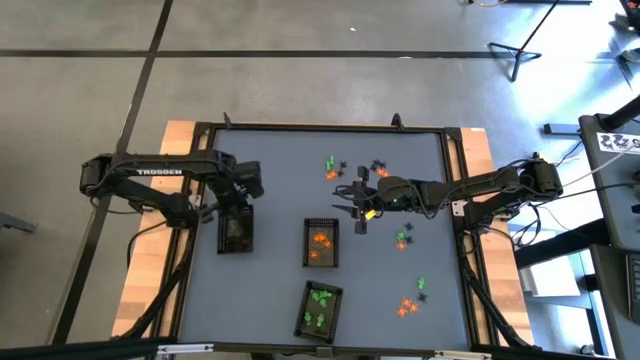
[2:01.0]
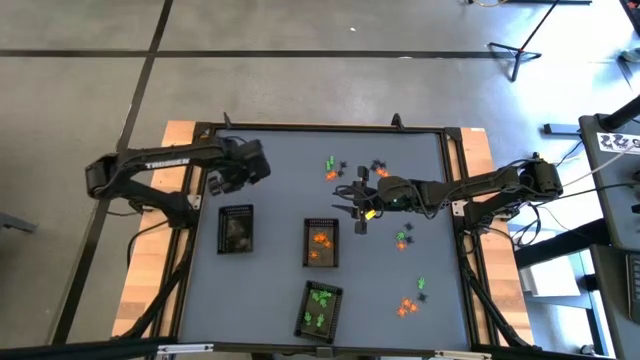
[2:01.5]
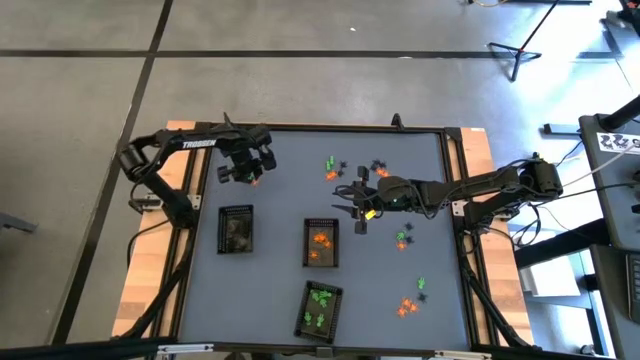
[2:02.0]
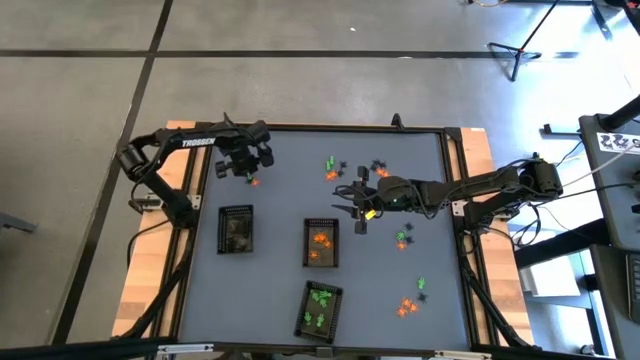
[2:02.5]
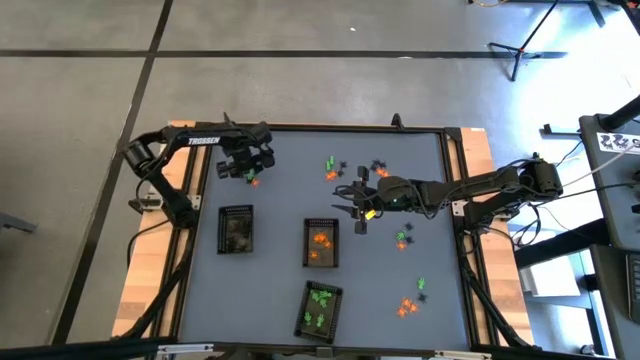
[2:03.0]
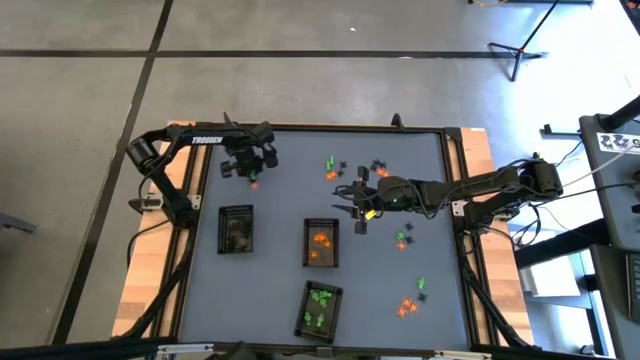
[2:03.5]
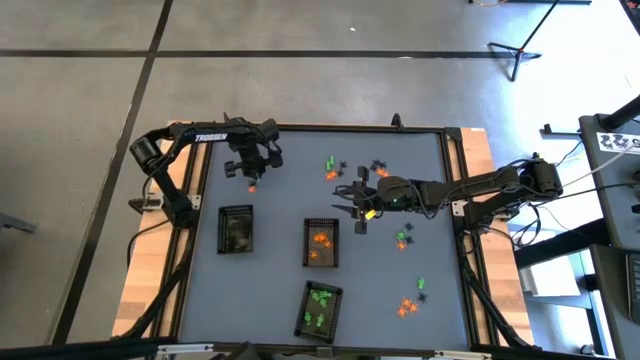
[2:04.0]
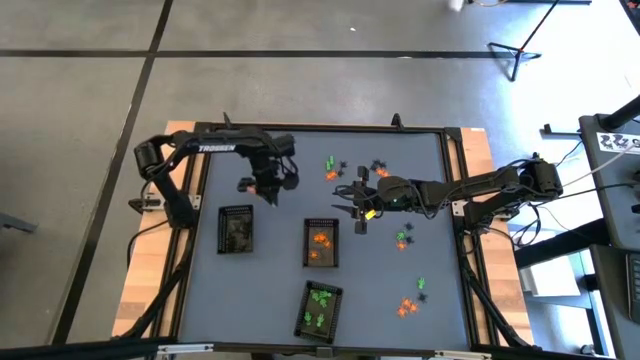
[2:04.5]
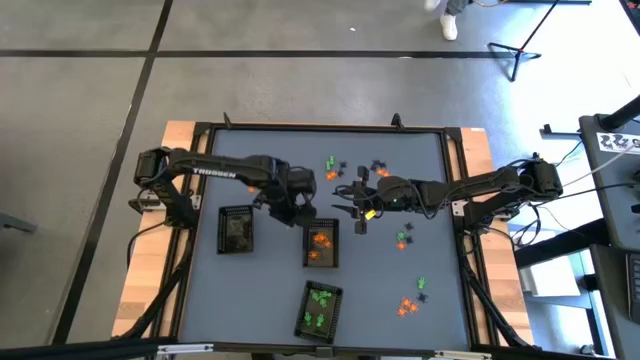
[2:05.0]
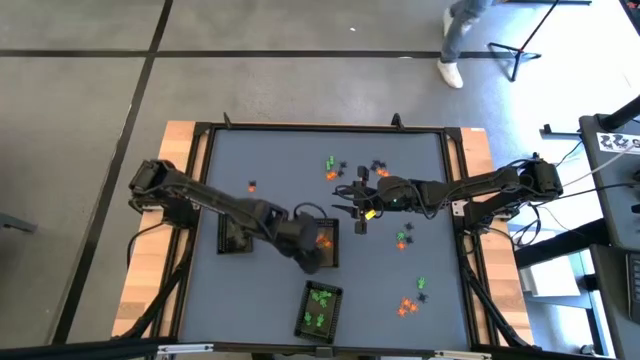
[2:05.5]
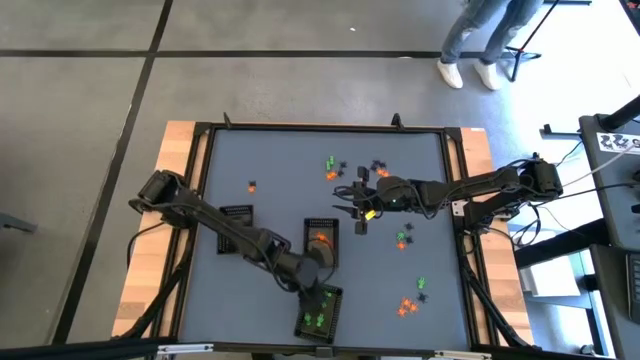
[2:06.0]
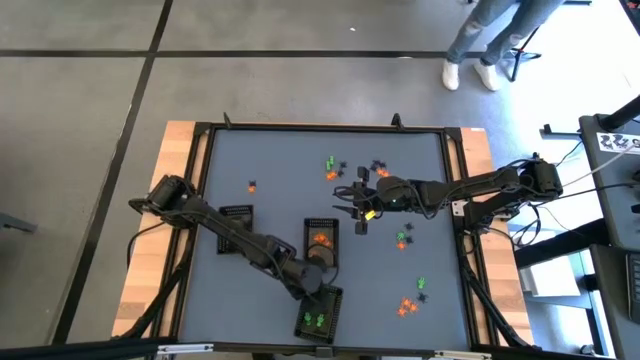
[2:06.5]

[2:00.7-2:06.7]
Task: Sort Halloween decoration
Put the green toy skeleton into the bottom black basket

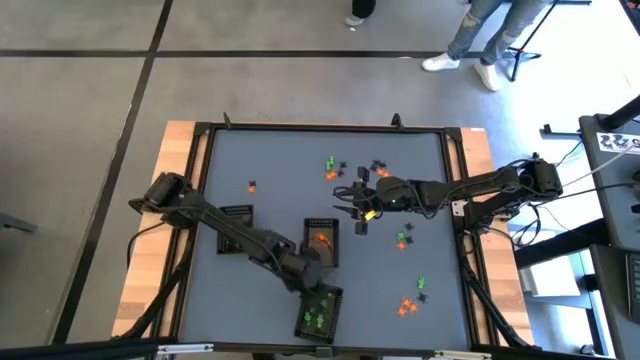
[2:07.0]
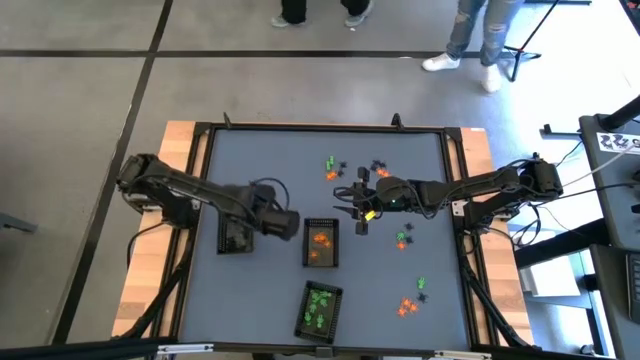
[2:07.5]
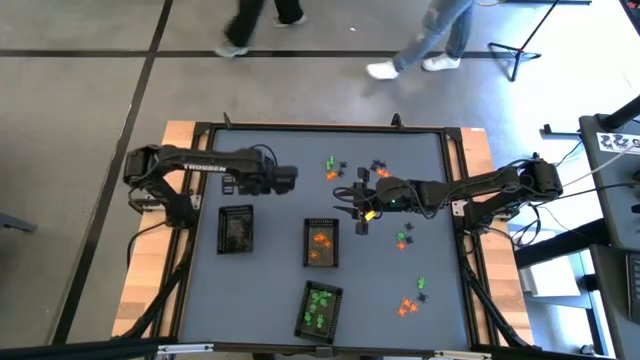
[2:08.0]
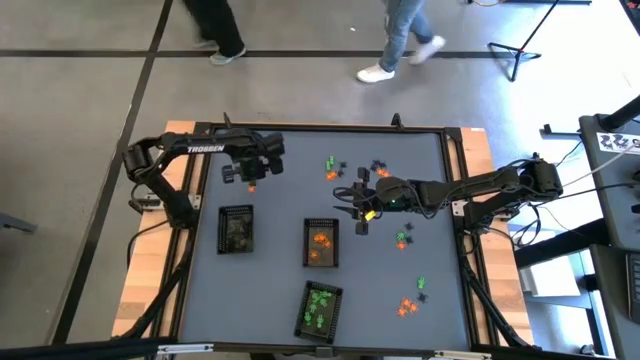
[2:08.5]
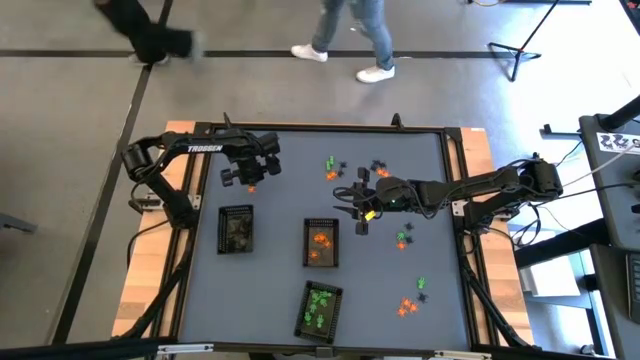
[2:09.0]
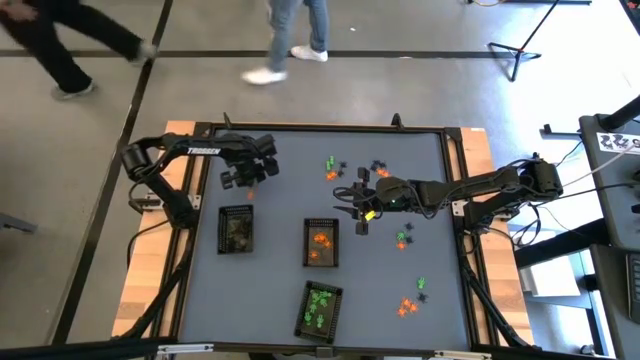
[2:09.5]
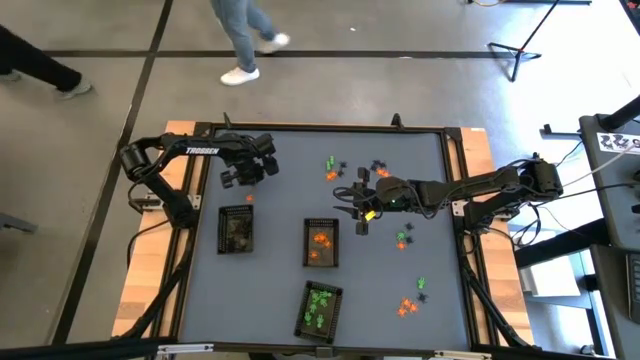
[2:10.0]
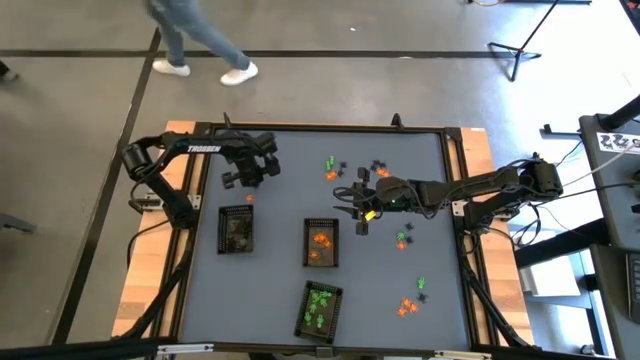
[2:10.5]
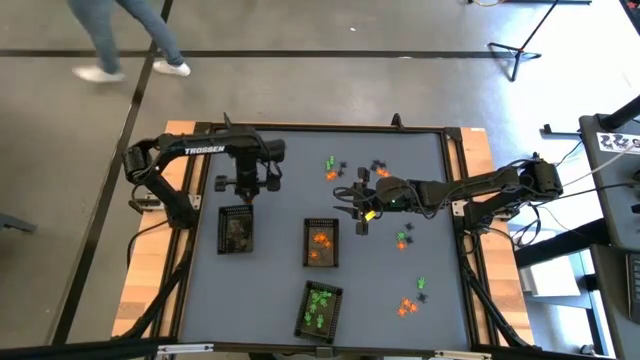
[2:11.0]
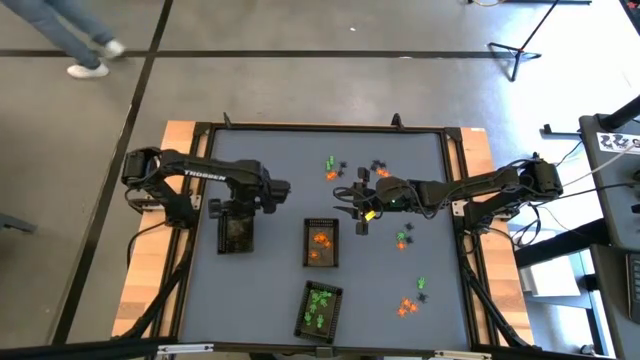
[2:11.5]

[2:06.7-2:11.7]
Put the black spider toy into the top left black basket

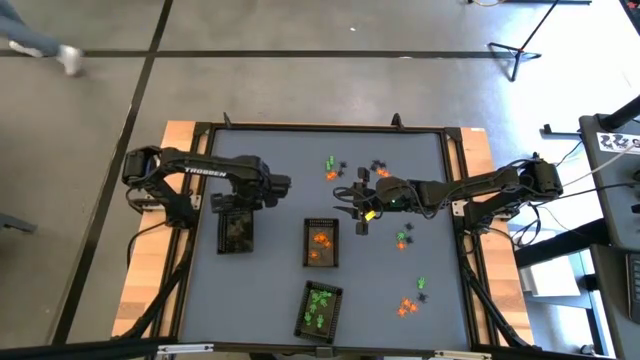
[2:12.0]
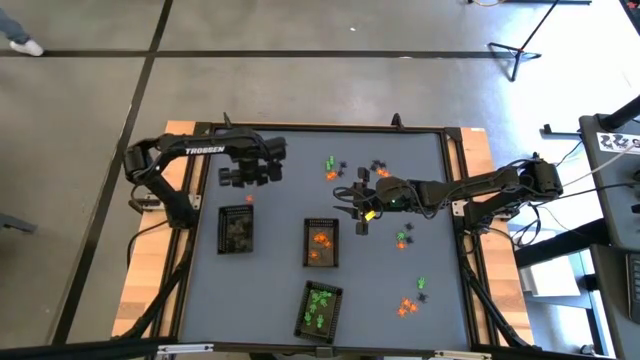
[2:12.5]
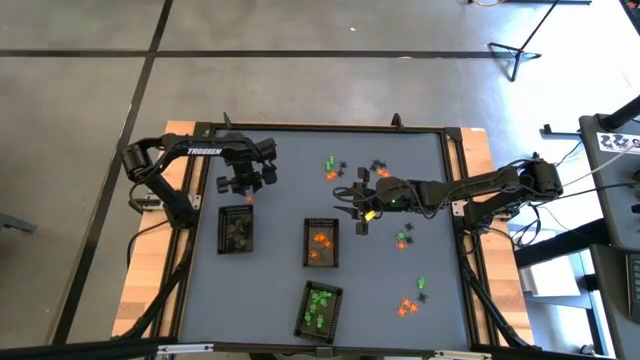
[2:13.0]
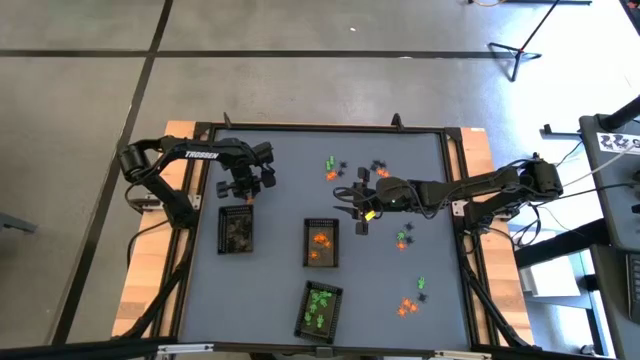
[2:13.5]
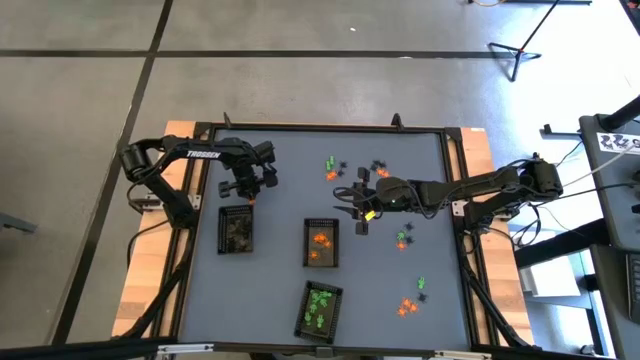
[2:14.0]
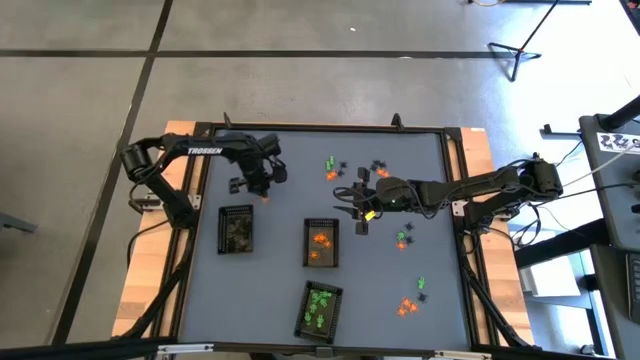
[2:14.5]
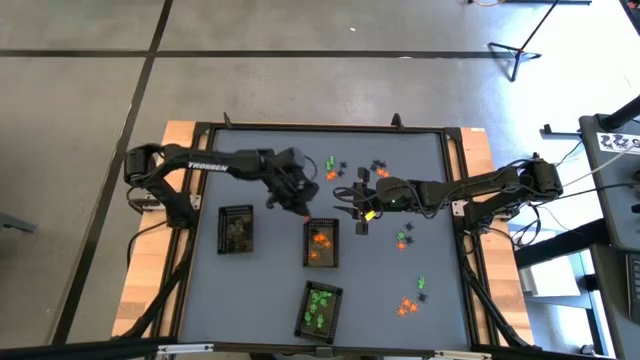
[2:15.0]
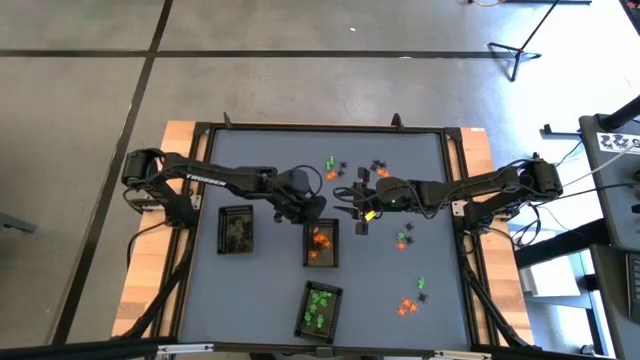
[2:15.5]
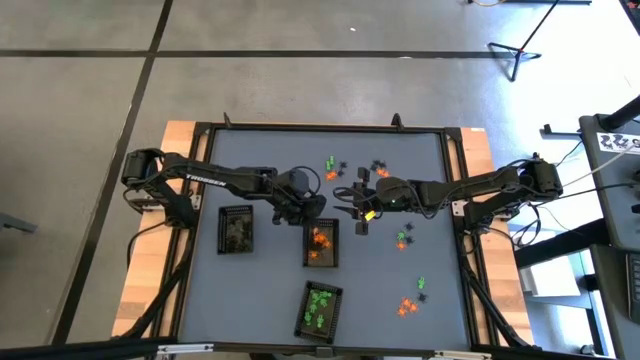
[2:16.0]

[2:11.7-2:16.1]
Put the orange spider toy into the top right black basket

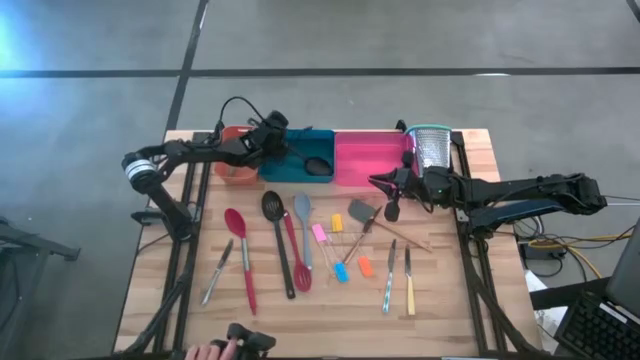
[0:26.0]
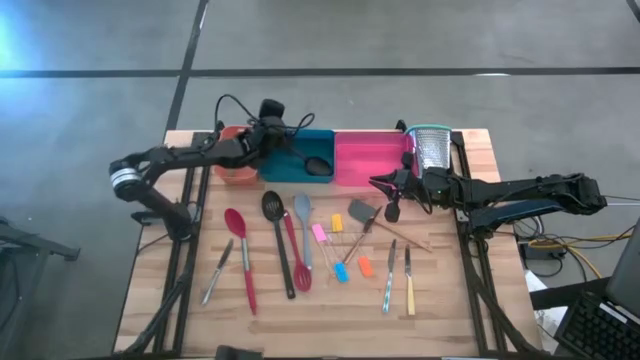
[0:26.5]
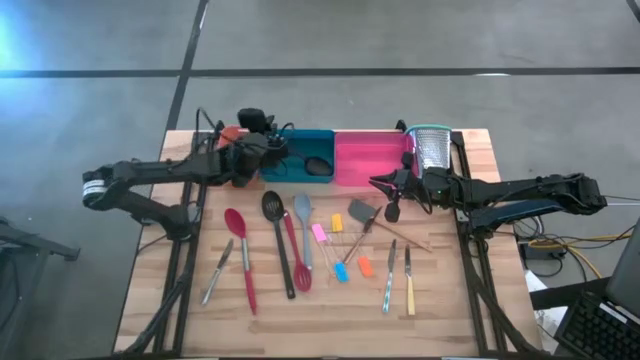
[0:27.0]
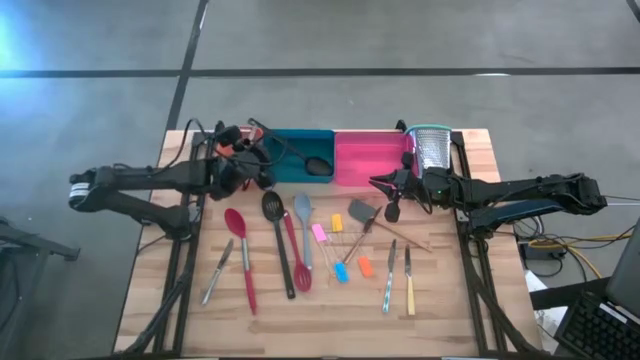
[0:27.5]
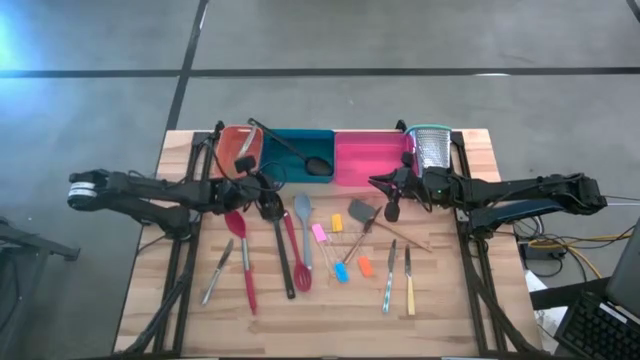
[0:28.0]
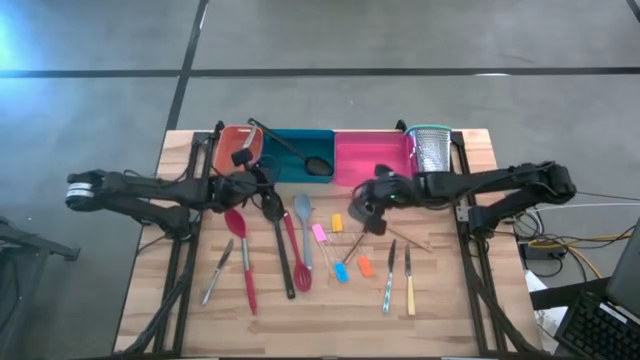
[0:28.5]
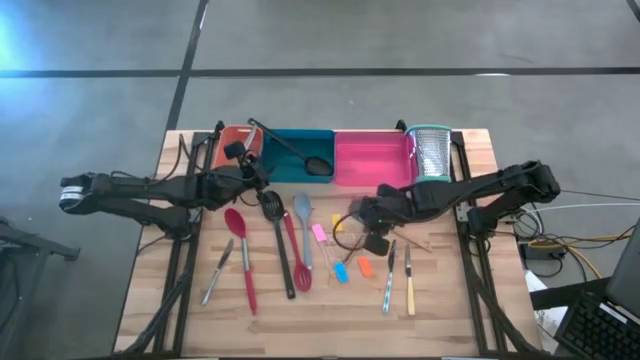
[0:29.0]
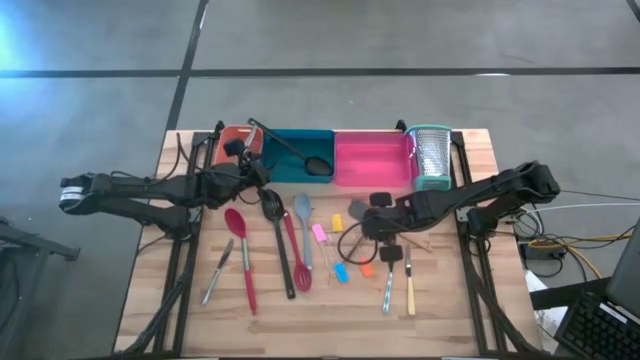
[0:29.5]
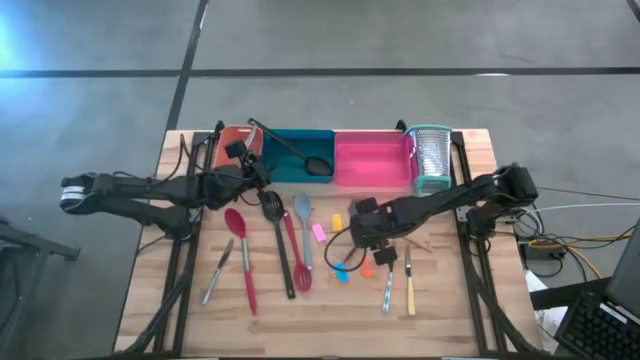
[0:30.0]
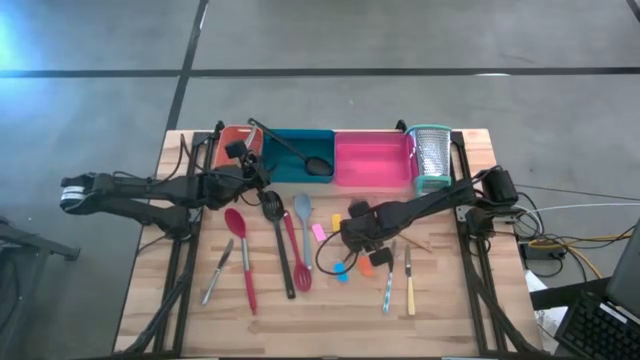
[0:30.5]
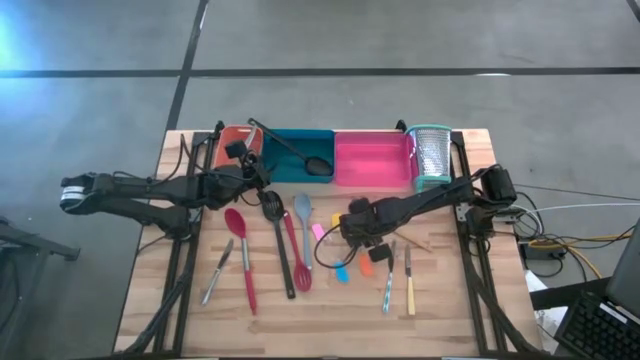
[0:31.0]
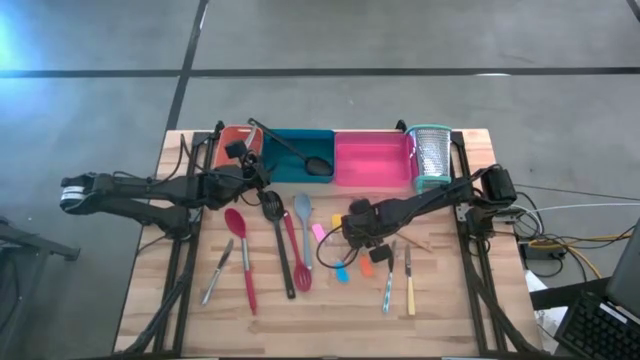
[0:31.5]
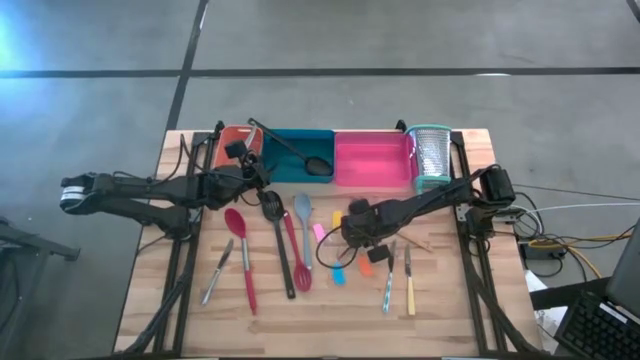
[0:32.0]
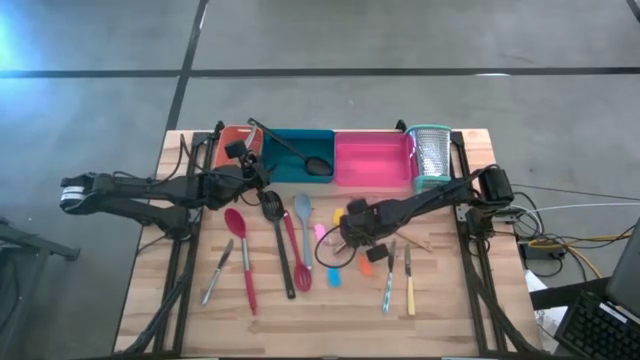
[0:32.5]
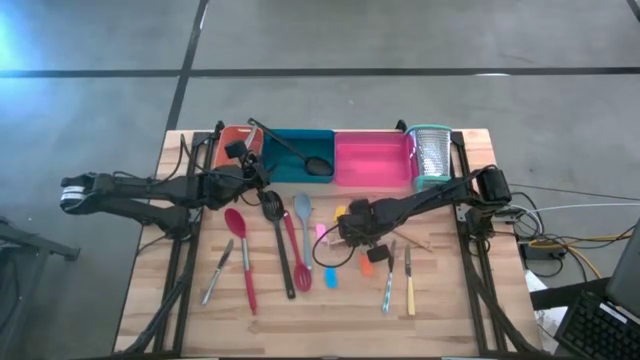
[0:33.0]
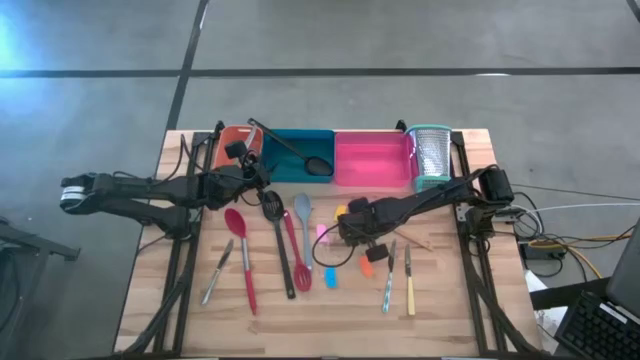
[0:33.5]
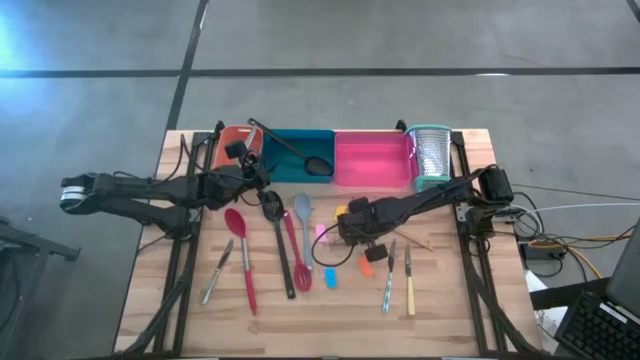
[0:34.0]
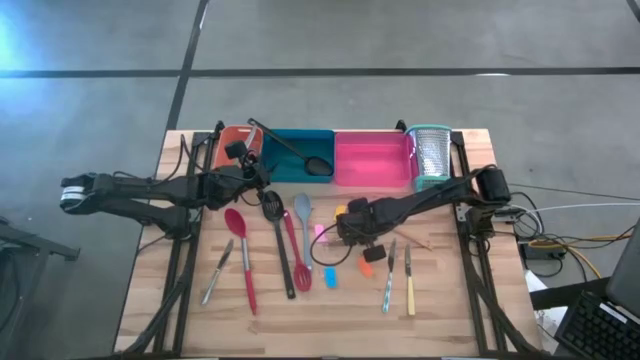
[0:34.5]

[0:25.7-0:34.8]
Task: Pick & Place Kitchen Items
Put the gold knife into the orange bin
